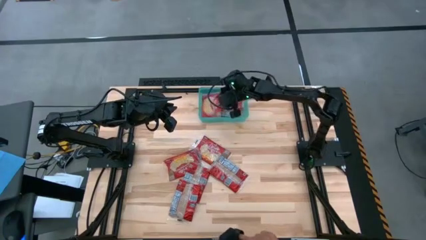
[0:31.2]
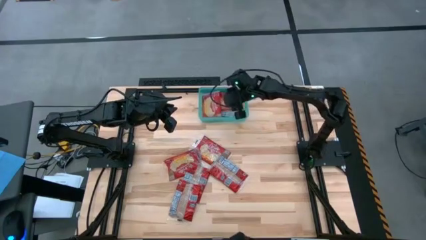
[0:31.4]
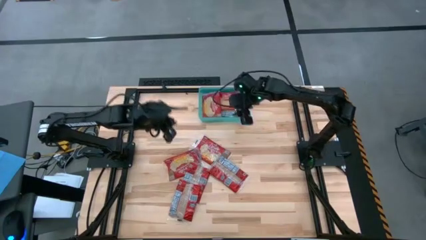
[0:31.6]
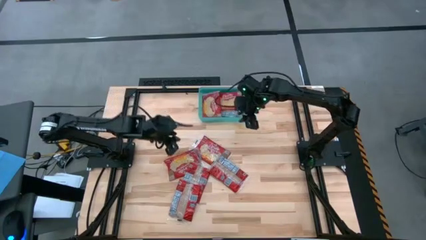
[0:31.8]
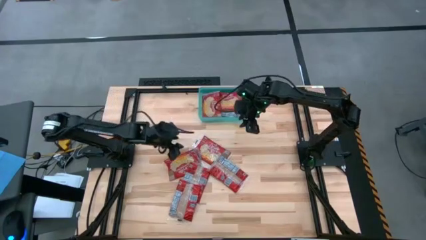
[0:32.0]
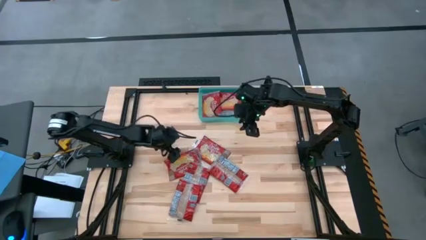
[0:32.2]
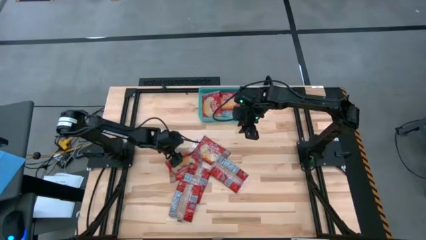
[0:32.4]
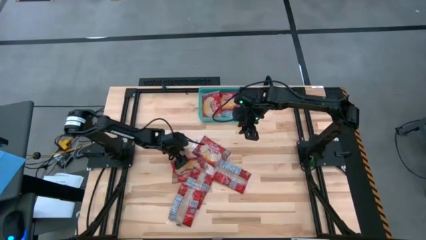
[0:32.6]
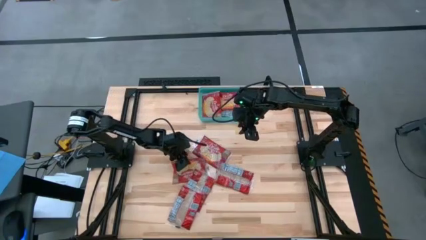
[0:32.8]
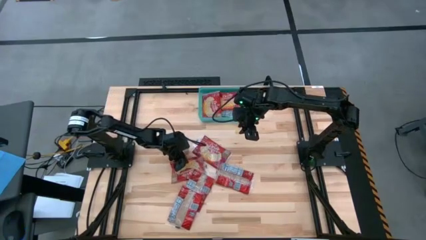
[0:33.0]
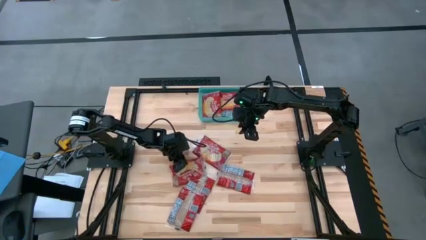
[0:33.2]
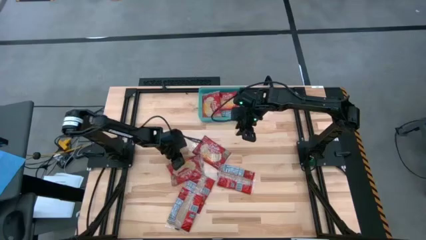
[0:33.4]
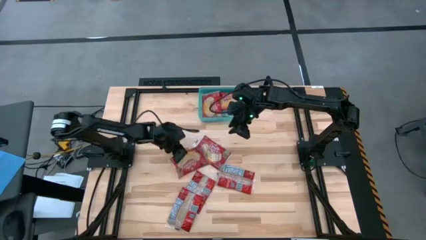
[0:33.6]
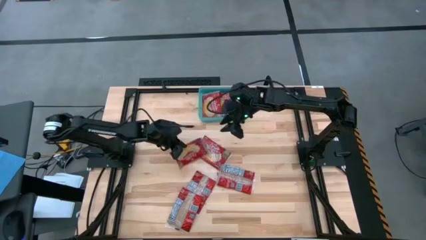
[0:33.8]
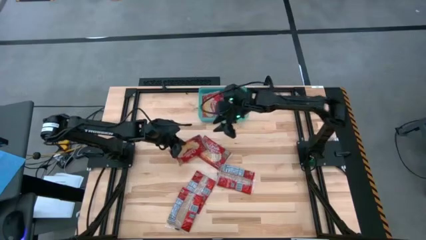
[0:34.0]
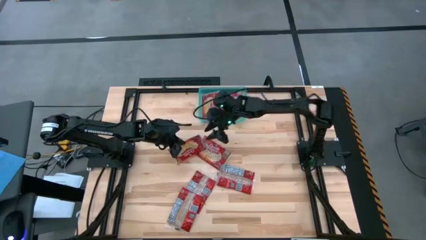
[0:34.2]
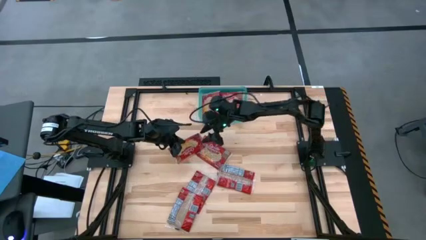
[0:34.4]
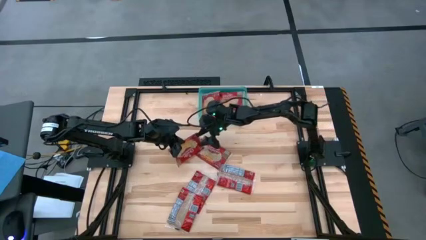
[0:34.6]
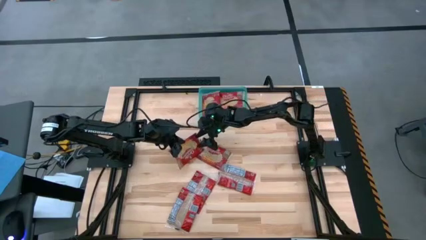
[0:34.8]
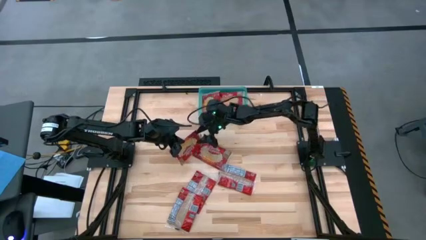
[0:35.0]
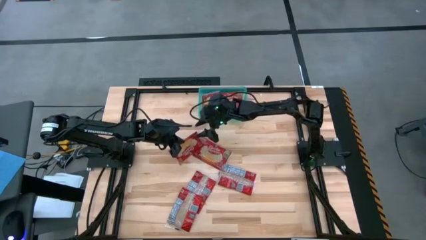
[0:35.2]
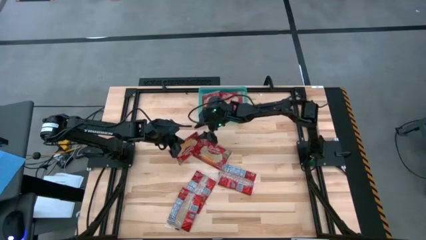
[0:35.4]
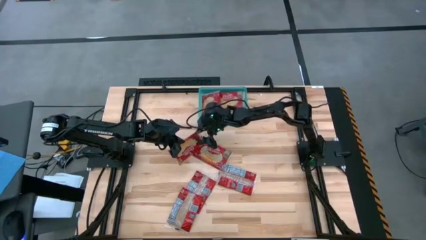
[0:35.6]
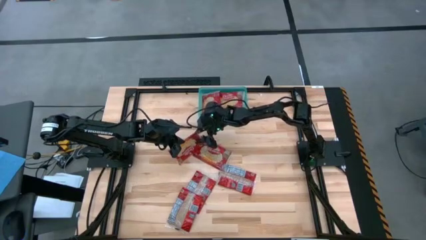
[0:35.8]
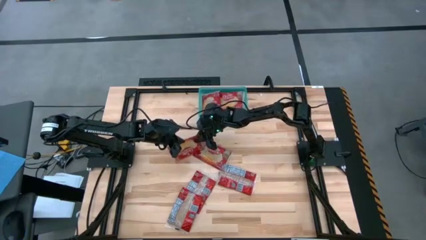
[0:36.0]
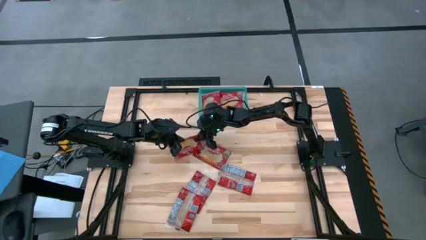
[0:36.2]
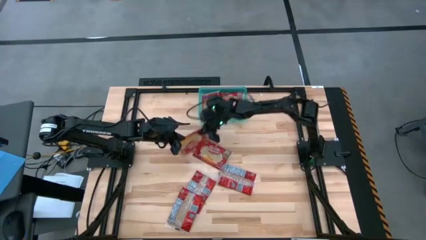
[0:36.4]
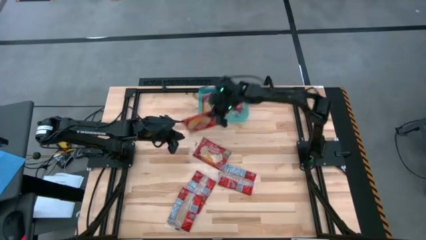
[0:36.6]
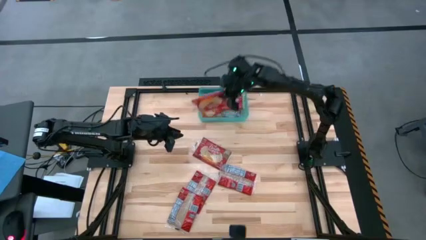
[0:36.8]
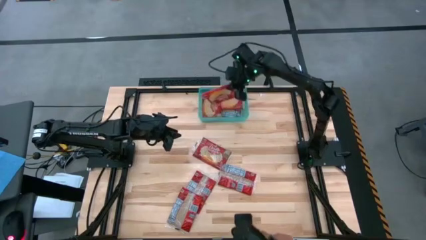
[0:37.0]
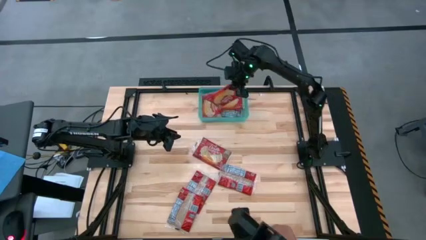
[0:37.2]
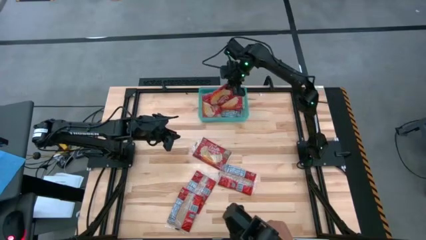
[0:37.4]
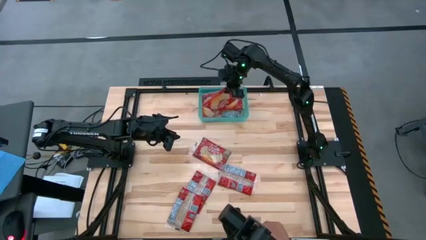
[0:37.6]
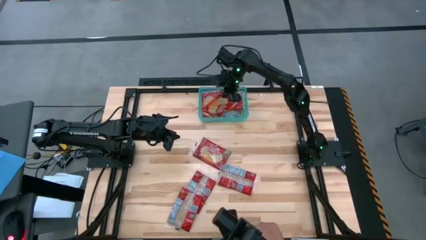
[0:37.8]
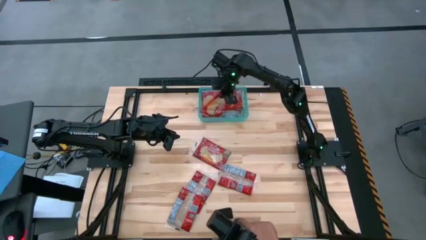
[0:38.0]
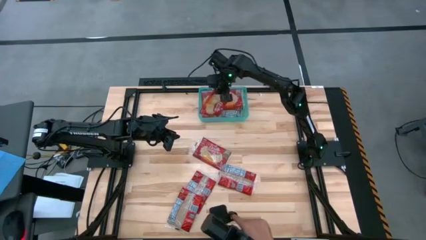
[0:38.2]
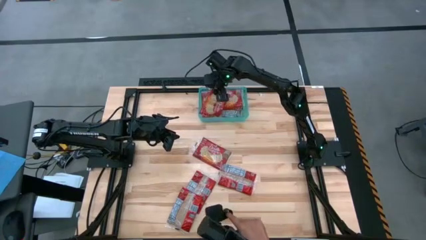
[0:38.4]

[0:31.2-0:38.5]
Task: Sort popcorn bags into baskets
Put the red popcorn bag into the green bin

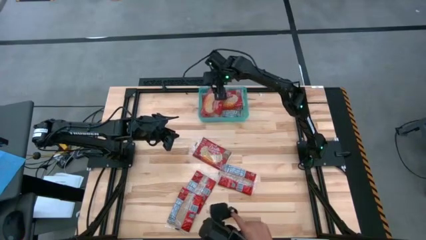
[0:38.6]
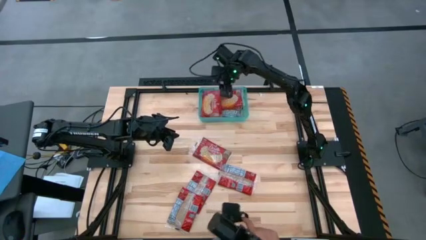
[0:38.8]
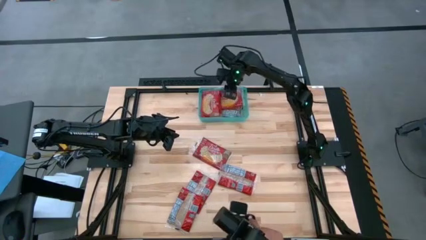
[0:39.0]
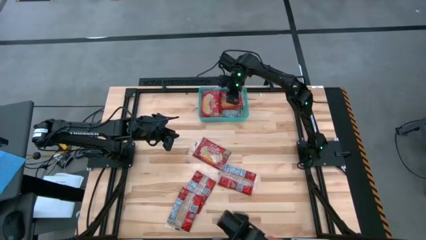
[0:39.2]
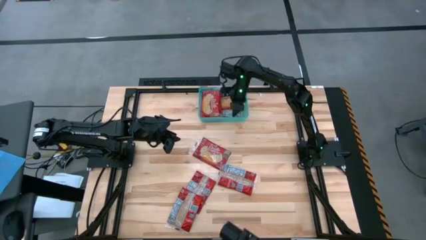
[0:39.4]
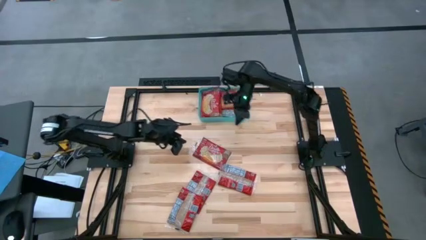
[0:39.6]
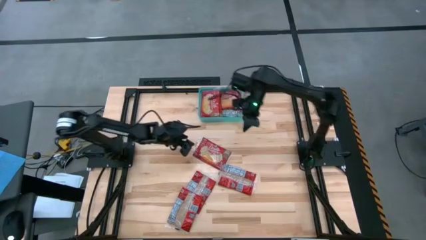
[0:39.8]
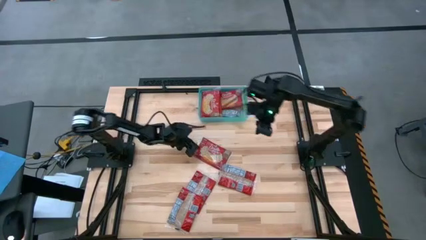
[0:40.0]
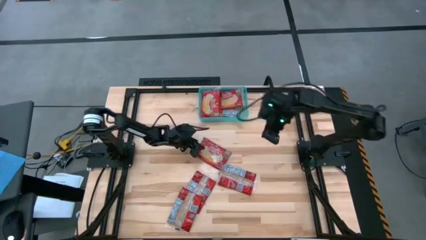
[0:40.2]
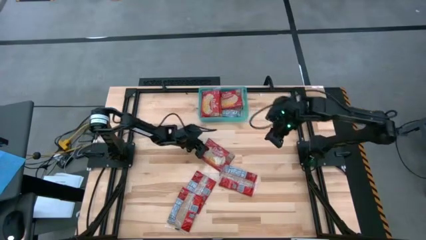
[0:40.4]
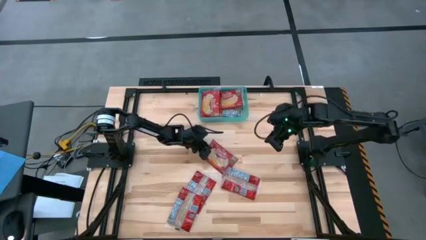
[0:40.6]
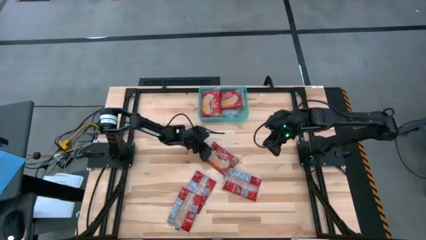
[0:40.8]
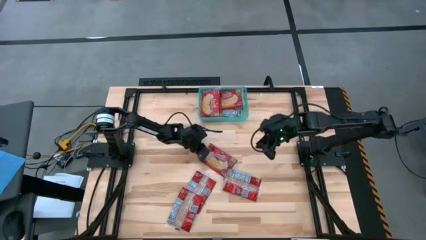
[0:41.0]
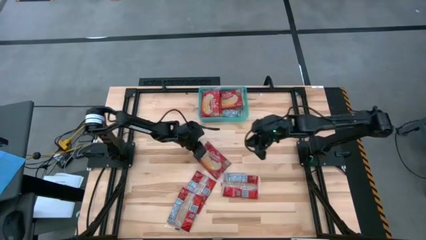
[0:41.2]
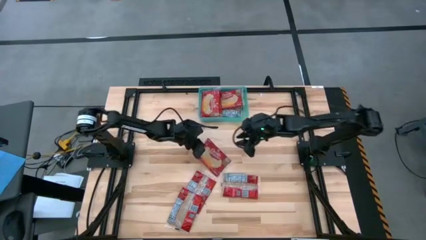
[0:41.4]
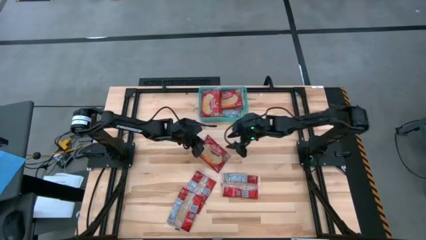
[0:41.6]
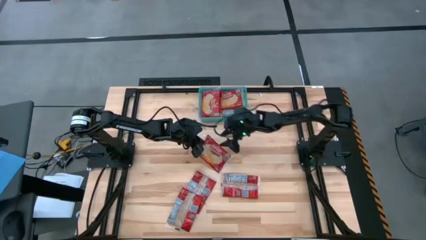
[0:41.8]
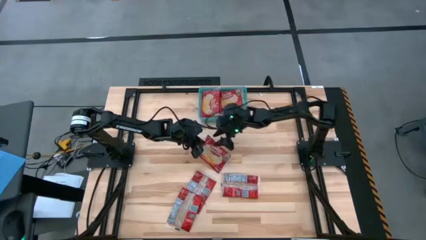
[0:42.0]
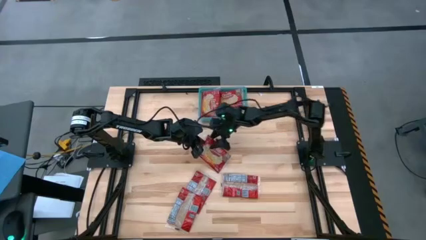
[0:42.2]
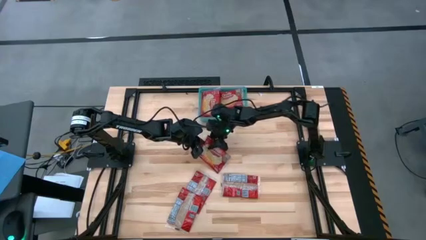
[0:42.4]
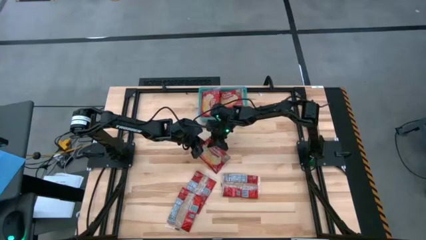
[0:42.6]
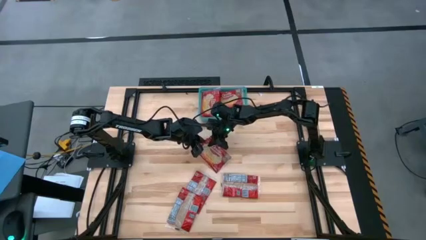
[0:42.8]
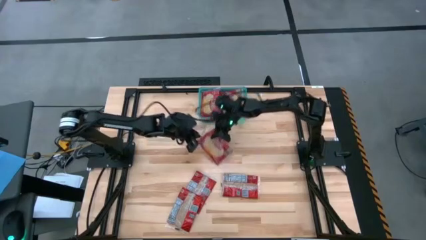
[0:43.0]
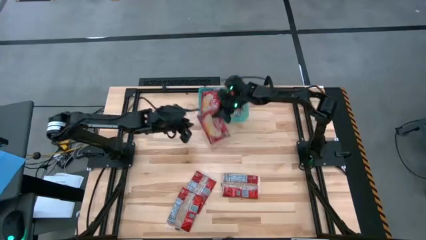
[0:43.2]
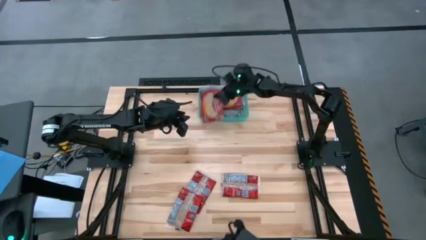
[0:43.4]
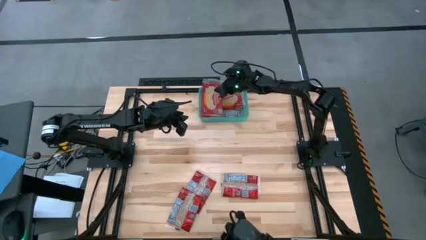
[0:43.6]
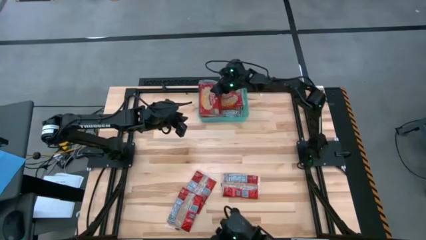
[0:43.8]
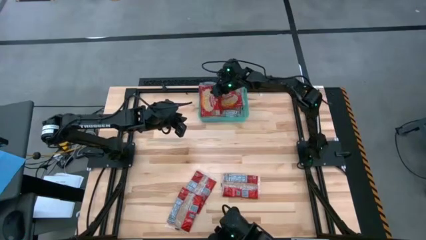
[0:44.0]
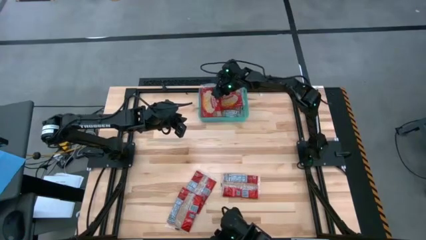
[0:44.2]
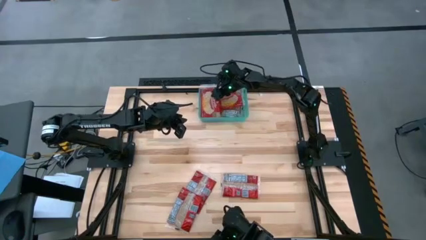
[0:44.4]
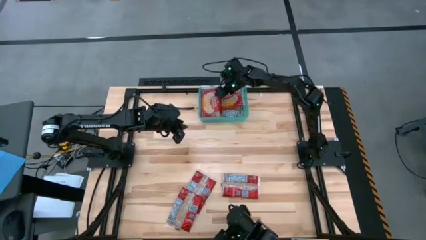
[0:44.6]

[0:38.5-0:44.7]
Put the red popcorn bag into the green bin

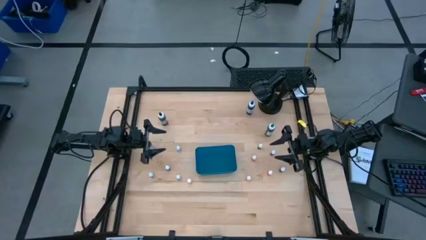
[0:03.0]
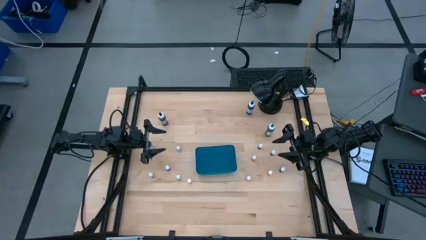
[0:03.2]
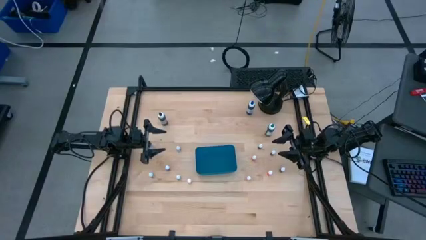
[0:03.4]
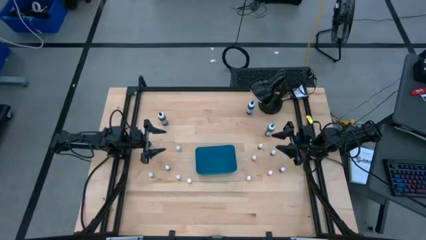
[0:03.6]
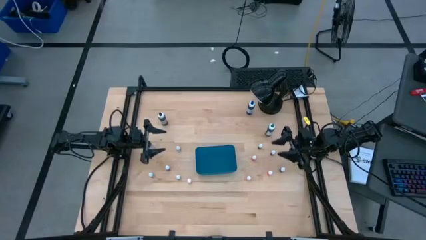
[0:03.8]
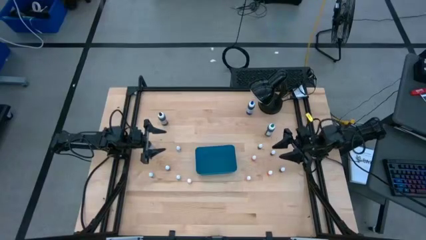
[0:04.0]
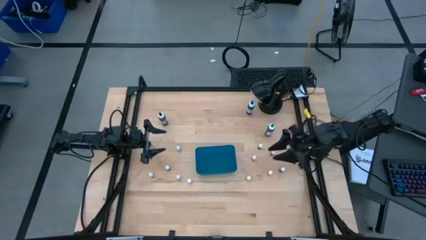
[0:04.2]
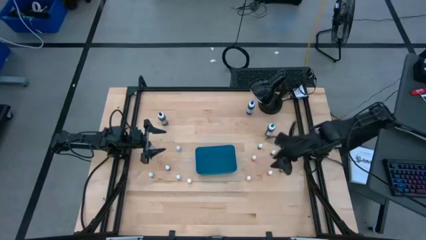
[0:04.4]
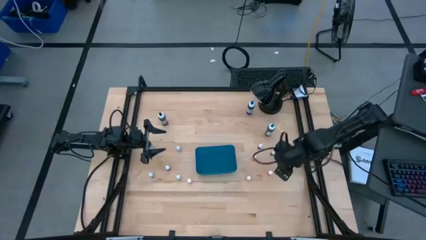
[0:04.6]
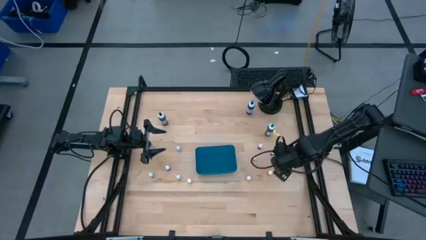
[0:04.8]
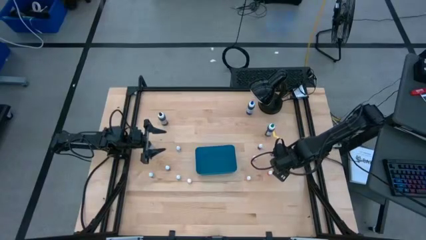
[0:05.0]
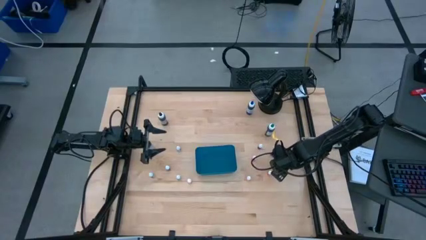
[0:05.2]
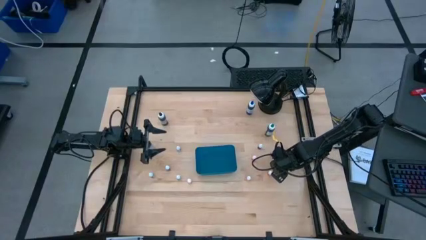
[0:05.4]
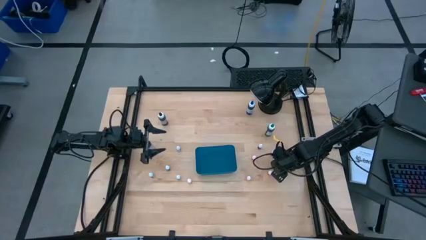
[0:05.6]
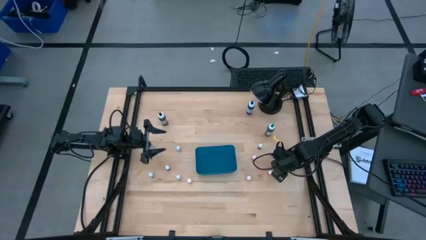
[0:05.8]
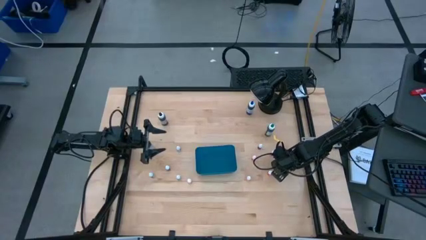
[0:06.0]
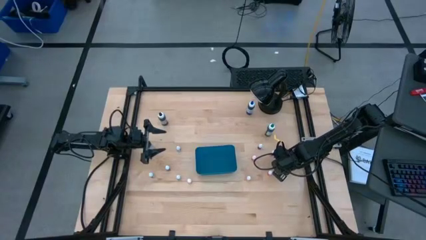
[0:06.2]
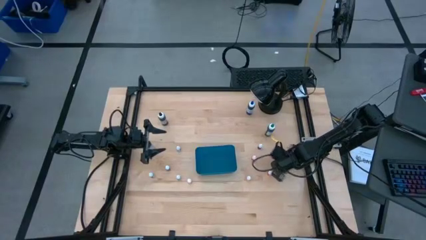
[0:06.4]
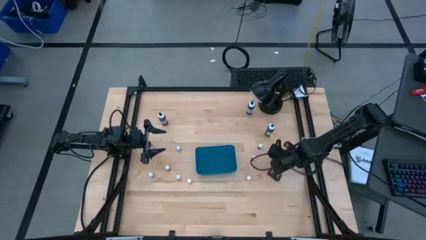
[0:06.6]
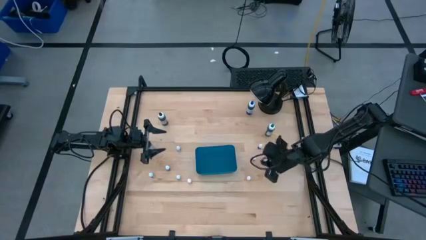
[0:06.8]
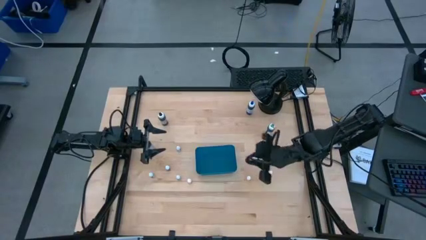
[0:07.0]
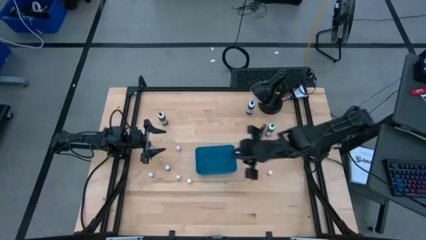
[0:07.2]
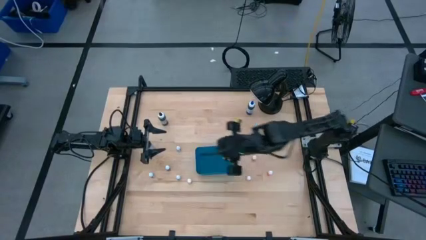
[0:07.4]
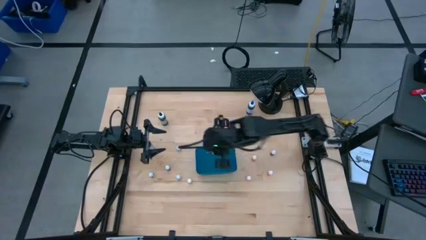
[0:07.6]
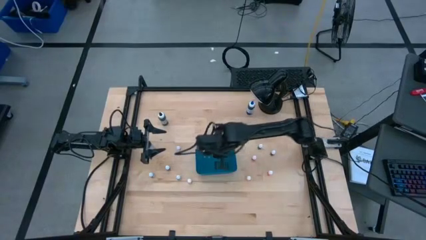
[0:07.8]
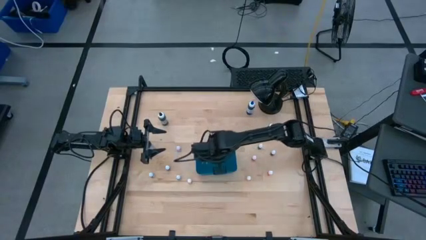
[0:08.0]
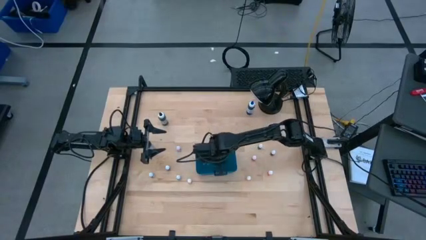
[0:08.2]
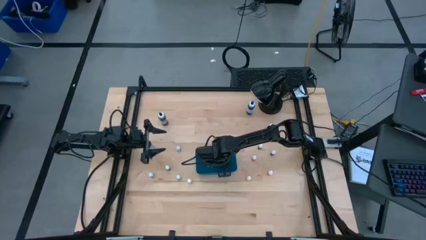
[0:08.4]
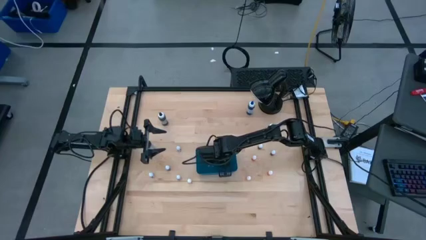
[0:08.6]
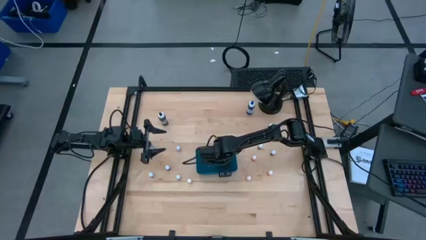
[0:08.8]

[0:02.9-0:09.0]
Task: Pick & Place food coloring
Put the small violet food coloring bottle into the blue bin
